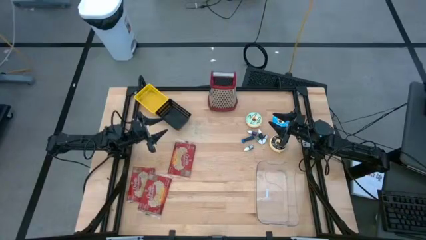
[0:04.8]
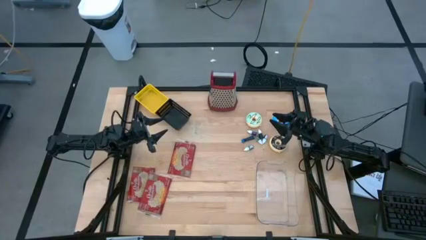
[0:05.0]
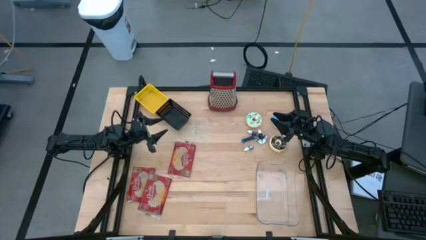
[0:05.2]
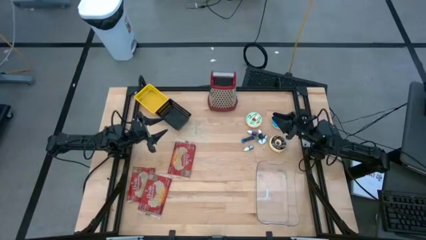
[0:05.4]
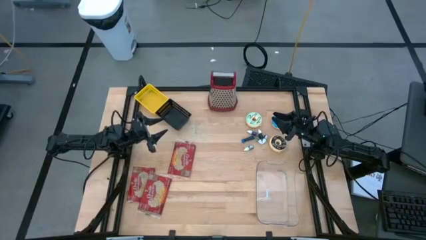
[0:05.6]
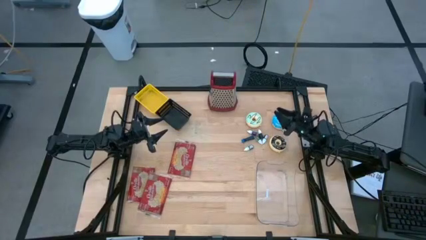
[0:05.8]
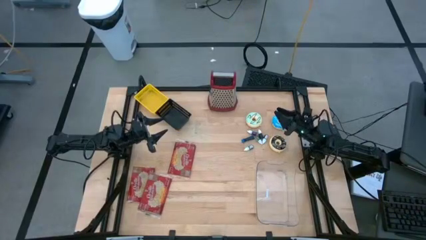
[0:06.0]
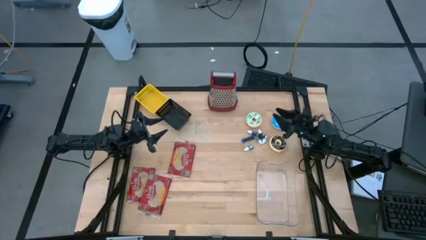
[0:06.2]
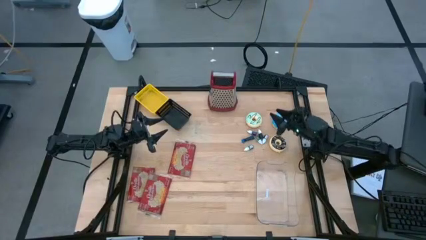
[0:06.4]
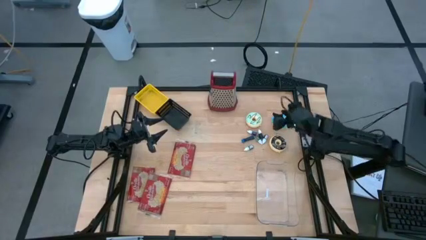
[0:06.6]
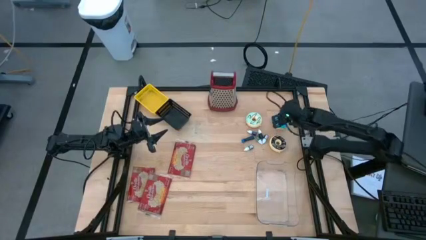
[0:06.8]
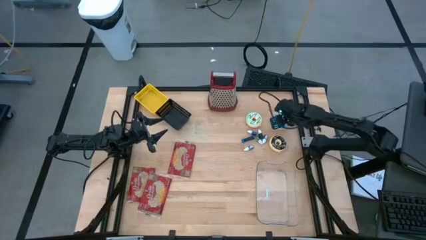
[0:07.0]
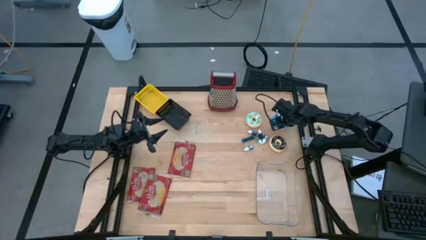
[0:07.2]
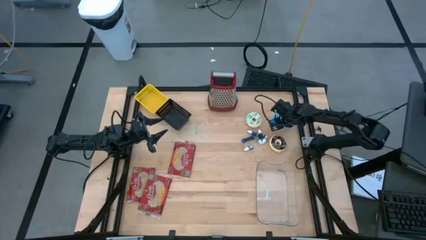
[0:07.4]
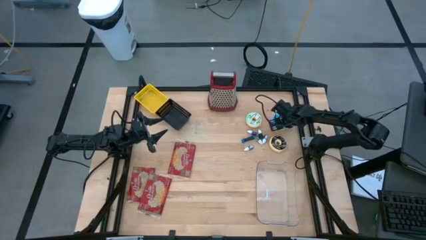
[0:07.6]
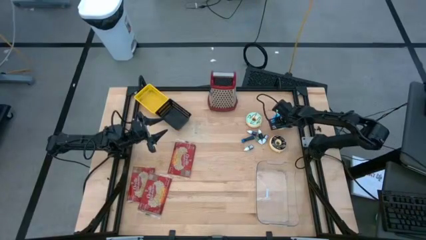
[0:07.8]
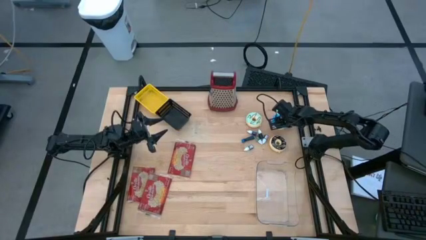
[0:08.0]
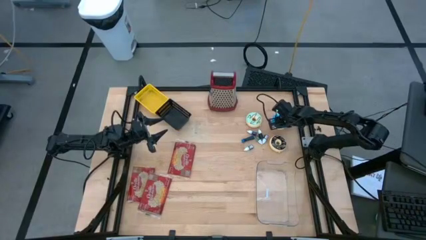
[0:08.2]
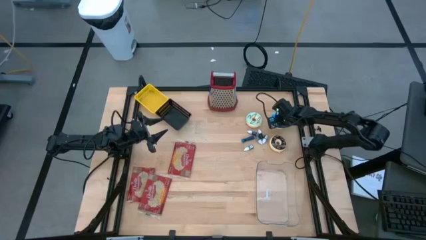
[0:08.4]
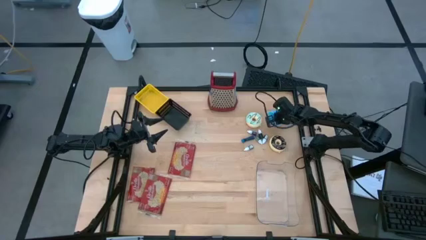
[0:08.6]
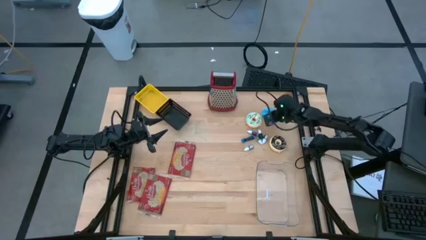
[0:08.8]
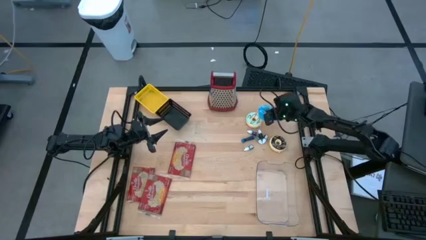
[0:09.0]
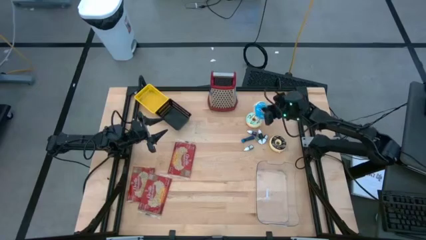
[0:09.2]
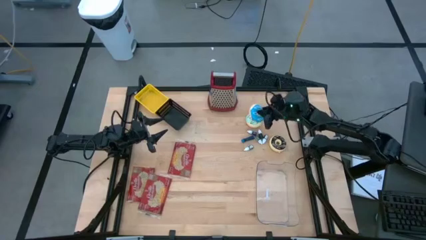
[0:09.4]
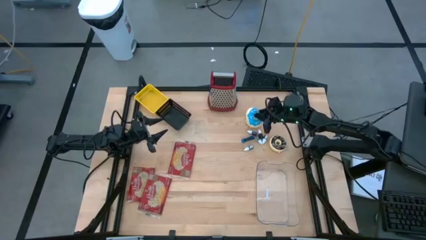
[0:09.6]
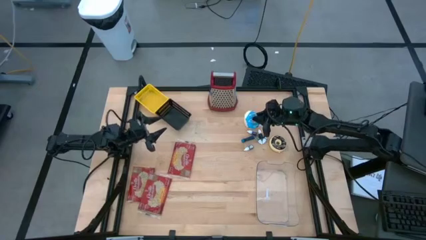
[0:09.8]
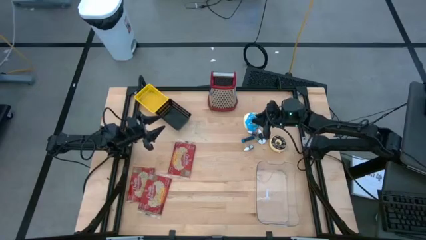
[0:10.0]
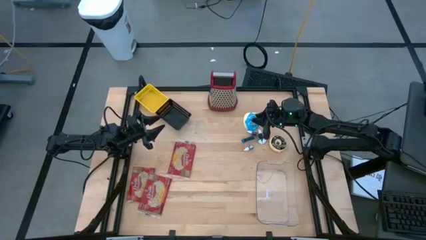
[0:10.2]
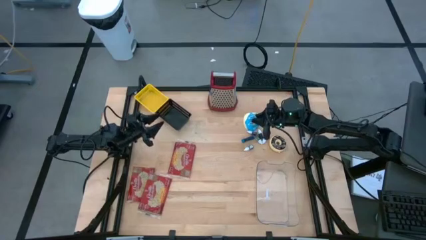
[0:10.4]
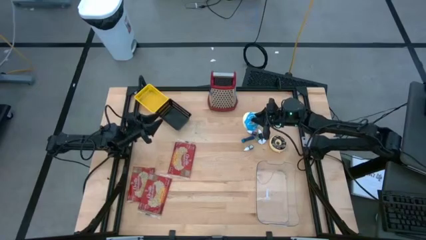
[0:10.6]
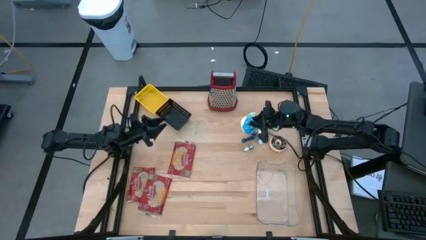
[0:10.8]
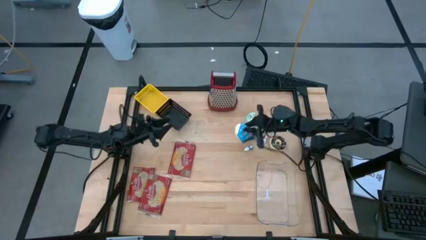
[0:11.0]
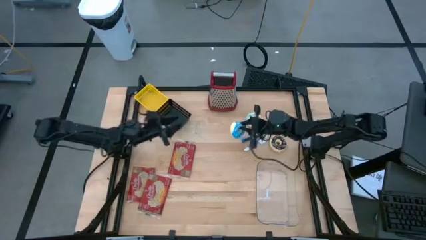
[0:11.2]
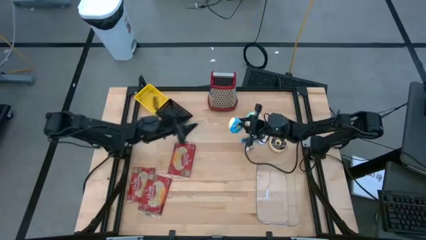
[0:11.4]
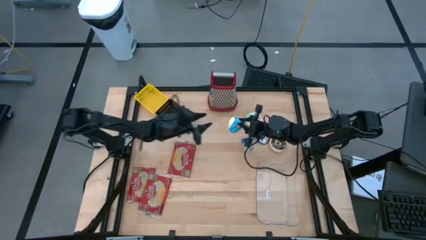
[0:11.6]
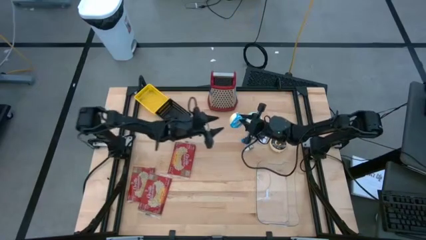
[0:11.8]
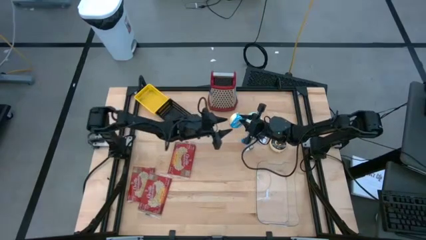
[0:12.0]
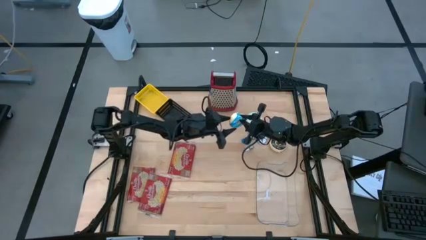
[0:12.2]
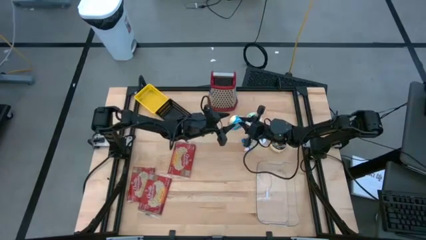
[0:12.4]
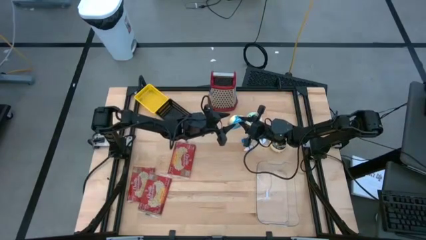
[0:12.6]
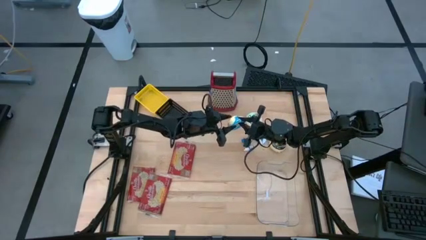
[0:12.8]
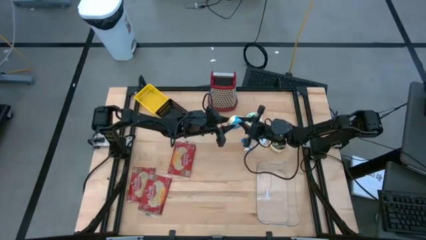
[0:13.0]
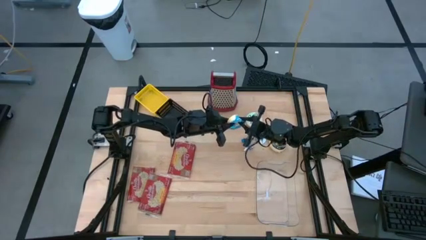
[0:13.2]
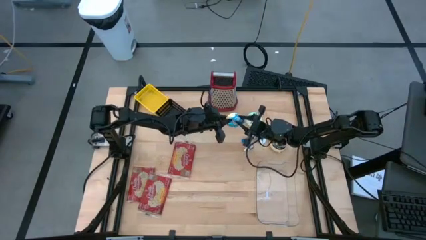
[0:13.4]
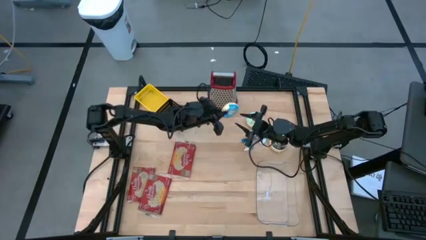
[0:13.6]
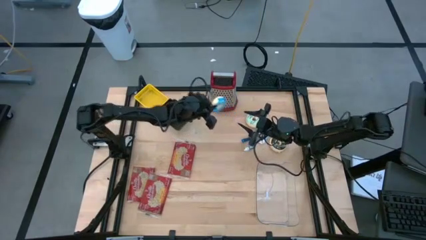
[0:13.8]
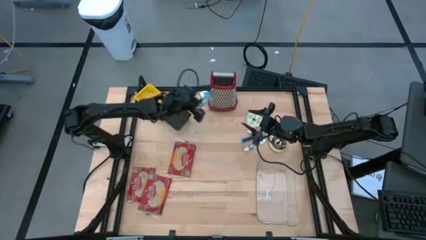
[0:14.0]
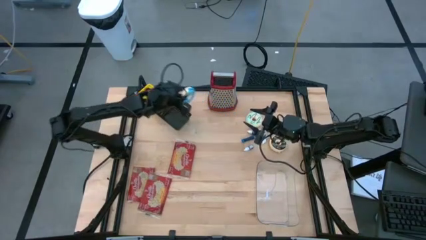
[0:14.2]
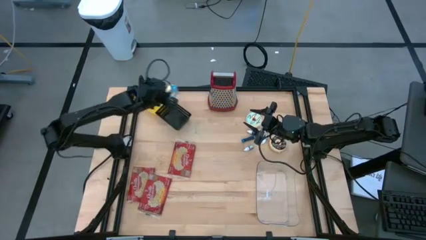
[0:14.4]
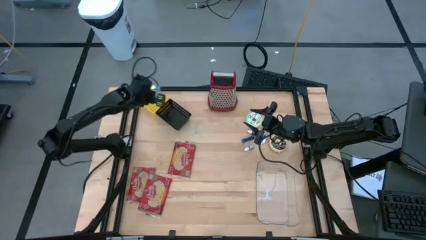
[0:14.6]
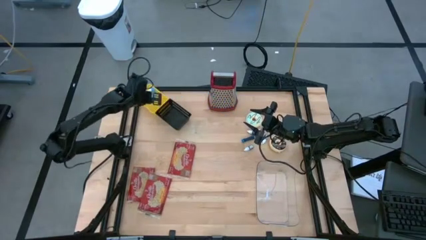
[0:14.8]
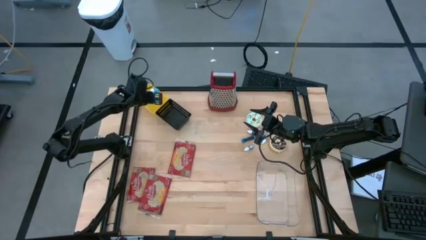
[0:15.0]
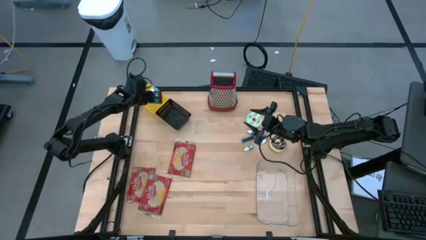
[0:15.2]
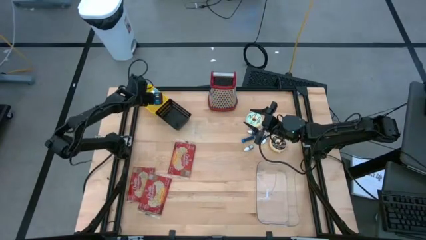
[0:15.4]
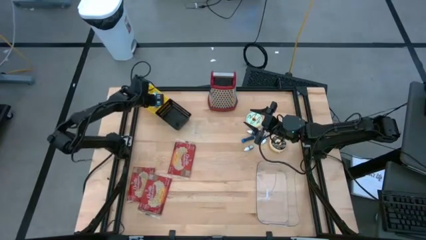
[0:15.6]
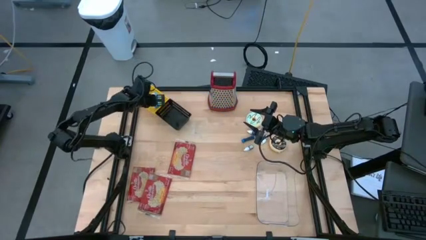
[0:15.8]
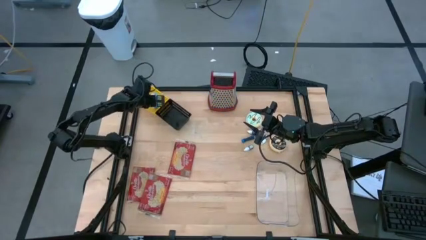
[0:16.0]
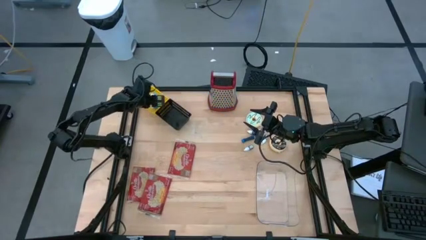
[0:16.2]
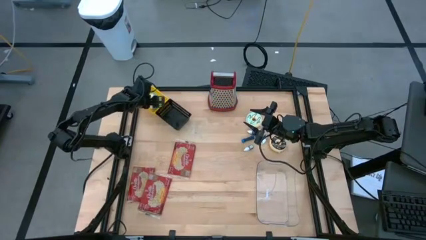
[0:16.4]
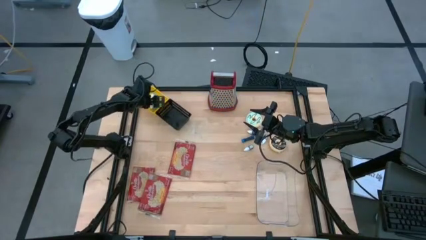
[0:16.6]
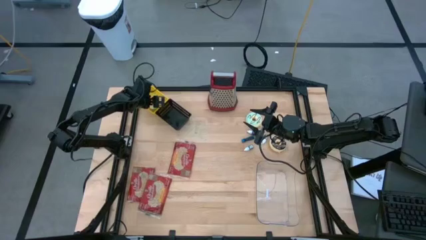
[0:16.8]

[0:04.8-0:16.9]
Put the blue donut into the yellow bin
